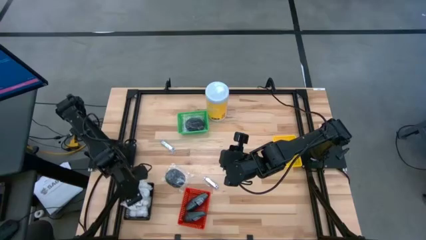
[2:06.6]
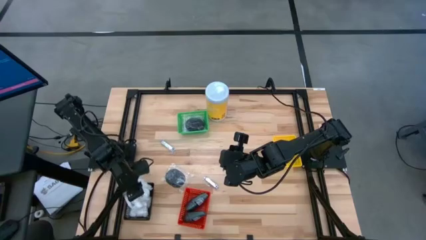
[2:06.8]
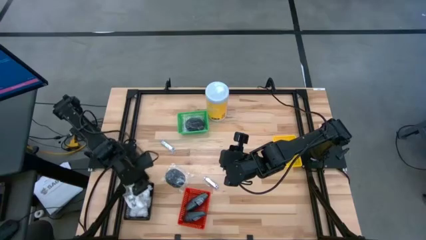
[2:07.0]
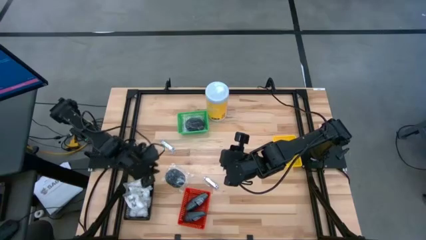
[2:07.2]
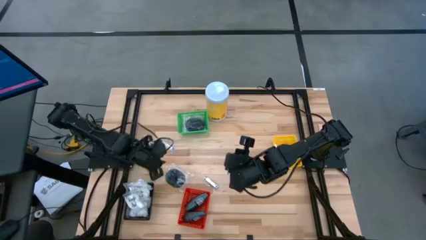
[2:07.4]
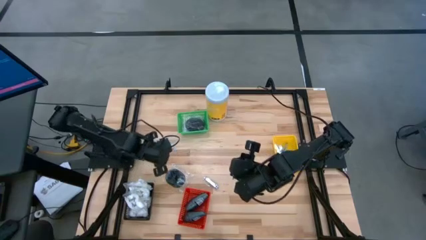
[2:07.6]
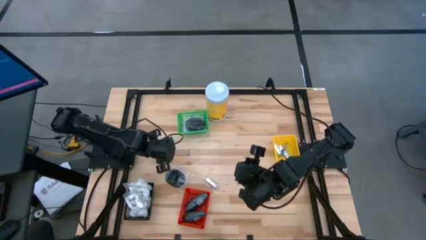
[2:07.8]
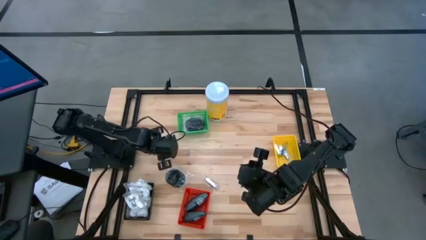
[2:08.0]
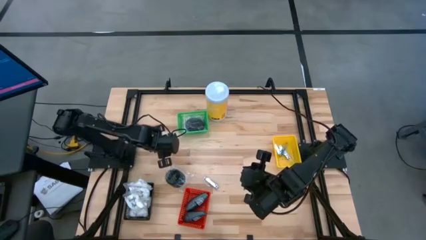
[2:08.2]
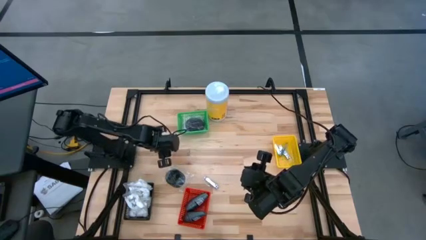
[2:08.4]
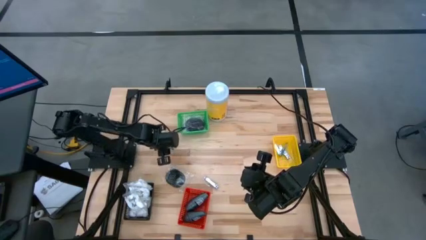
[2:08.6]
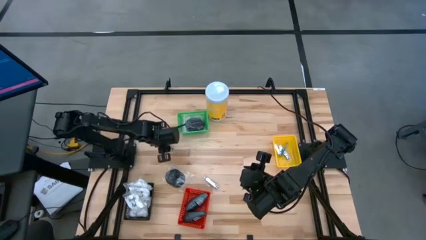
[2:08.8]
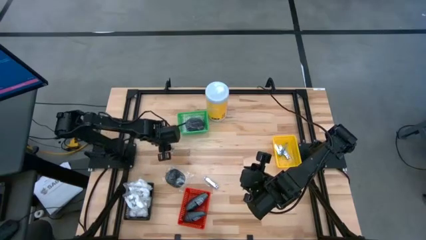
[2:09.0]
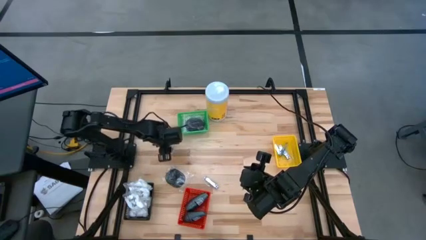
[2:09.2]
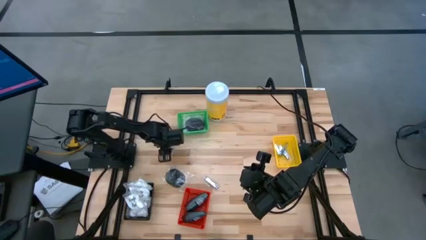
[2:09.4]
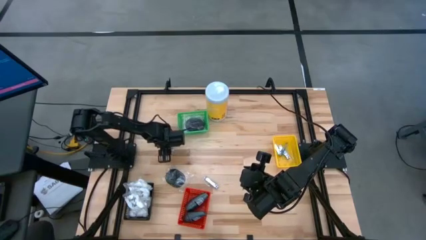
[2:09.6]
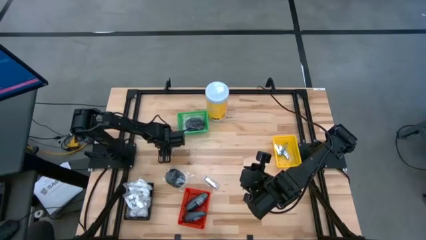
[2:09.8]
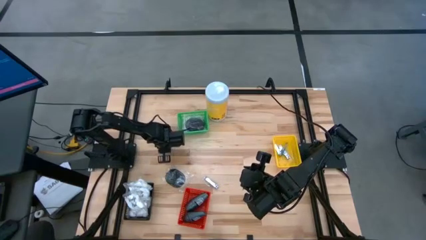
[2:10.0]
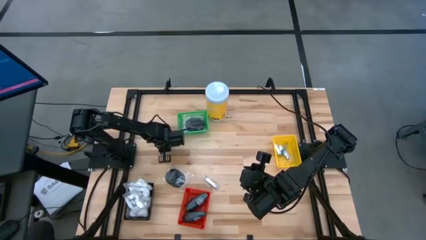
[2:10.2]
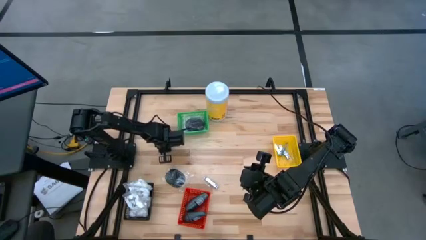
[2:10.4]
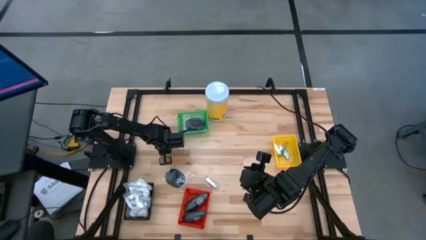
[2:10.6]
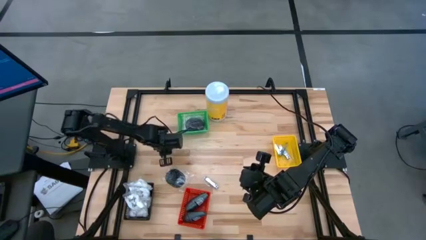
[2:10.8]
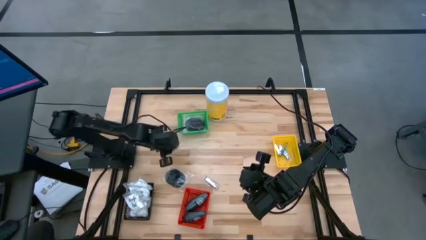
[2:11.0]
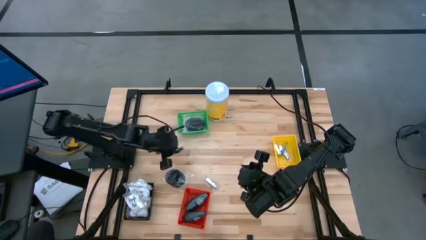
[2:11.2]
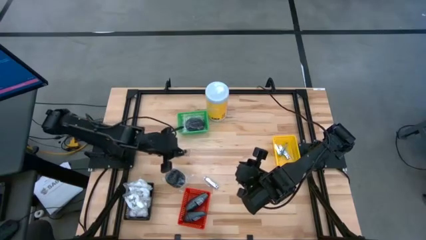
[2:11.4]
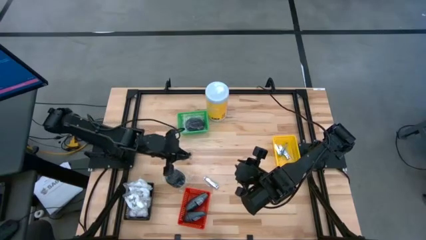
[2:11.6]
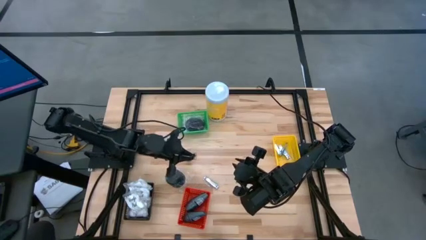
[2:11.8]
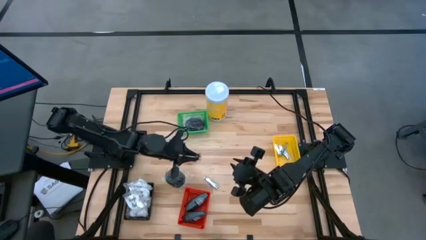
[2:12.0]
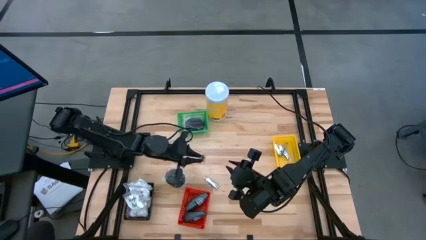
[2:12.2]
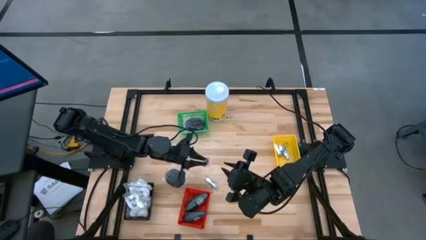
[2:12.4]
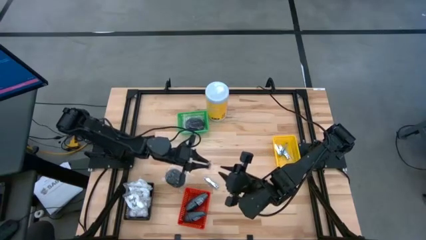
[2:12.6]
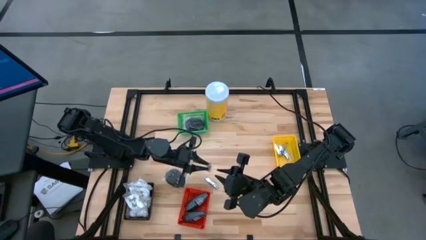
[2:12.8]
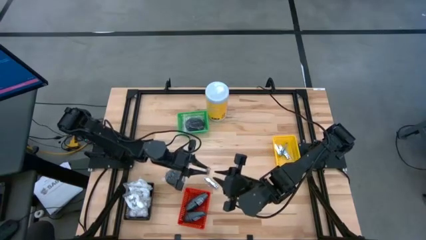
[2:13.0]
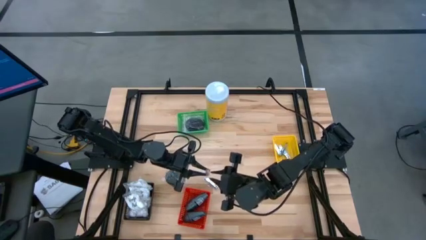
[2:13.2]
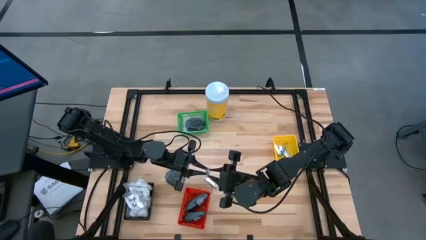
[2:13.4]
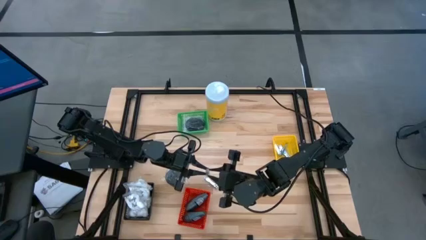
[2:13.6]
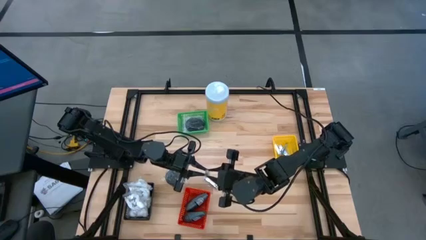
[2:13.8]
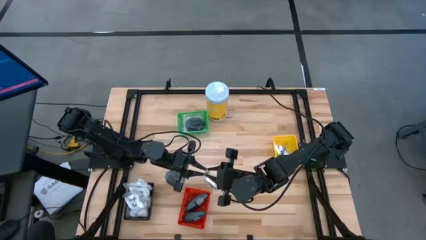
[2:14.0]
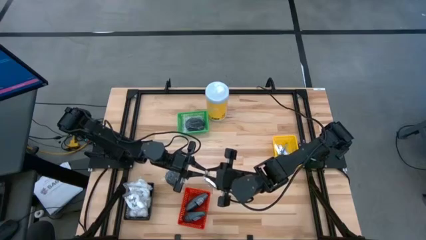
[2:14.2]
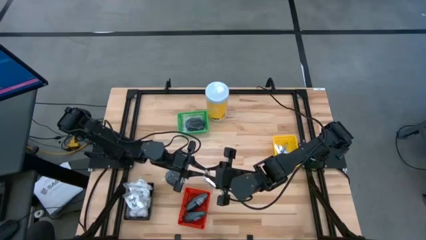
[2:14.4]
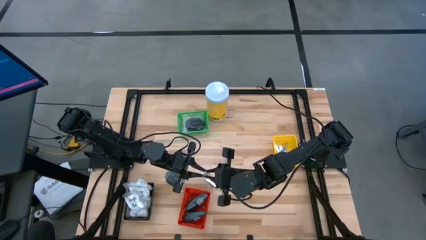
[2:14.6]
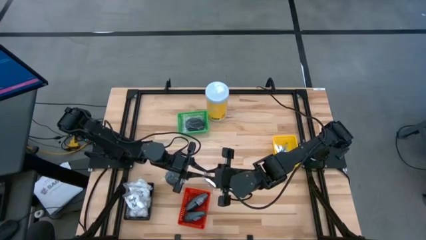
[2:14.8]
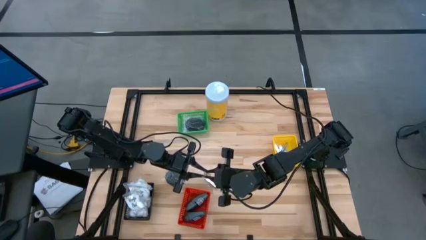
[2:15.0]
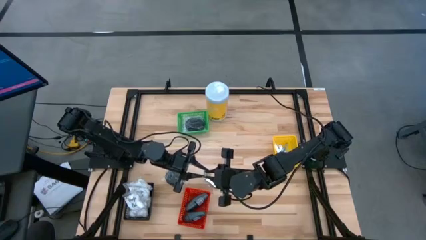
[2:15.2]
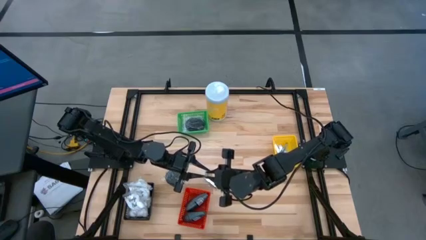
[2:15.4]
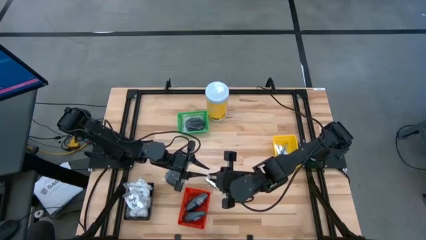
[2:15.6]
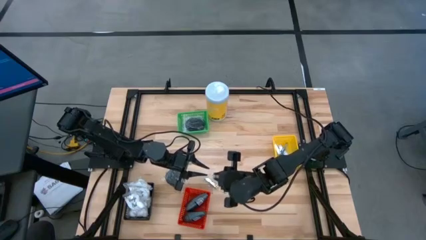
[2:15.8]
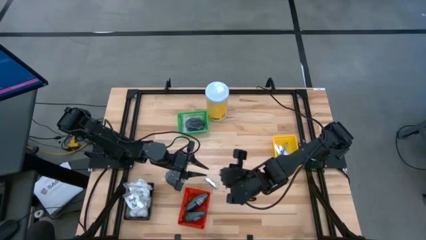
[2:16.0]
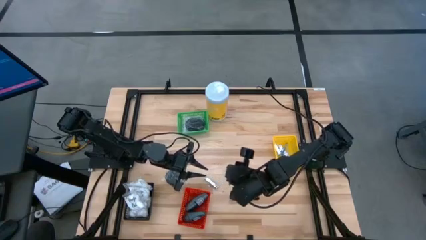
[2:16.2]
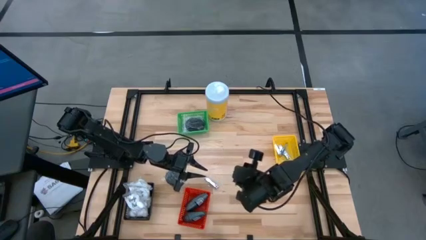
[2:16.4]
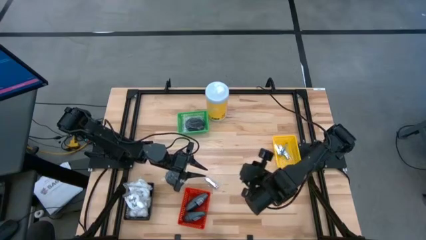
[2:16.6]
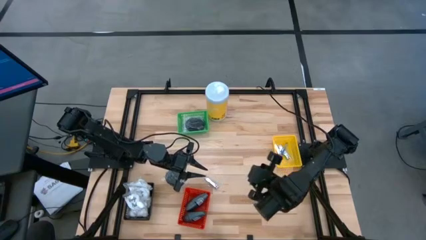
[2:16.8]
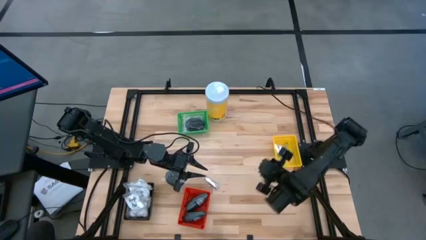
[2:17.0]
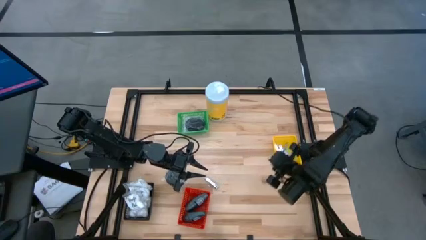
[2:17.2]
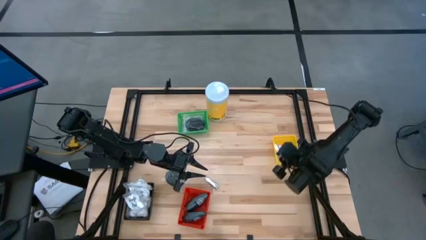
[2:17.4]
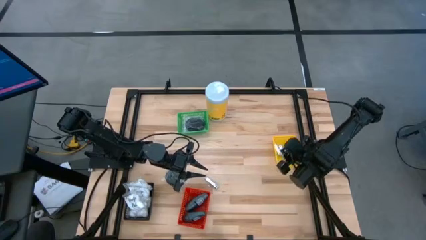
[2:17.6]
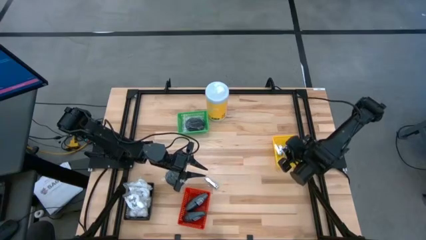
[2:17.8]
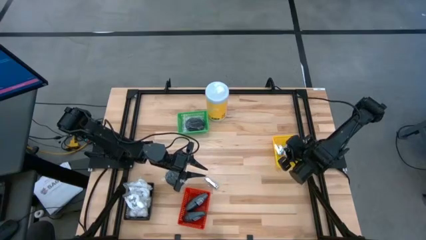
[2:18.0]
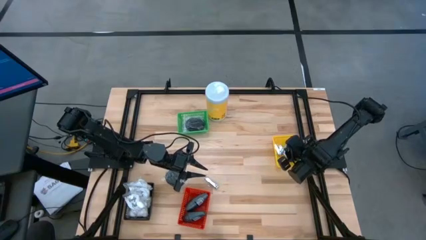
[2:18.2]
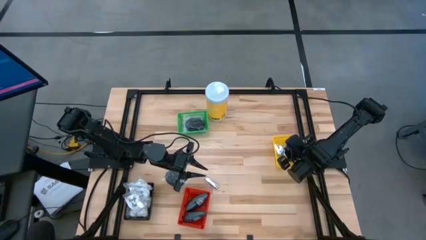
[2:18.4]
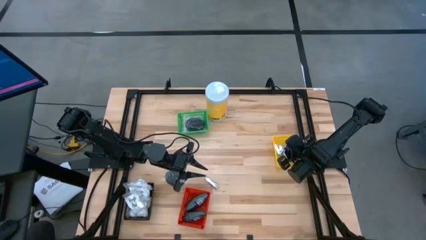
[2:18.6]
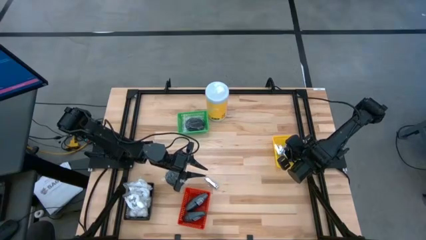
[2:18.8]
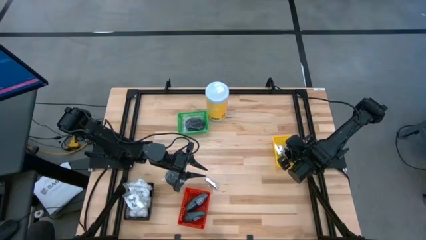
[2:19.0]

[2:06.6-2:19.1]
Task: Pick & Place Travel size toiletries
Put the silver nail cutter into the yellow bin

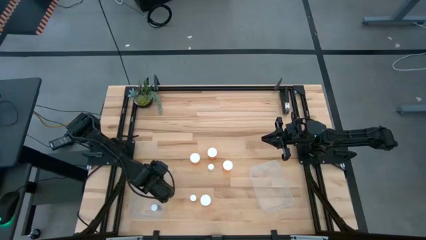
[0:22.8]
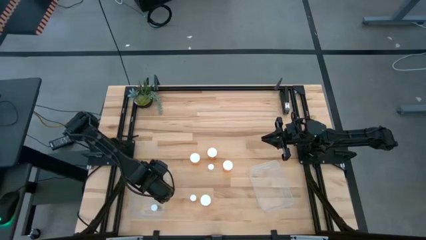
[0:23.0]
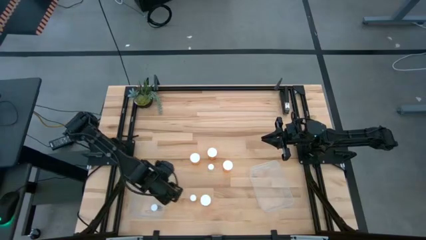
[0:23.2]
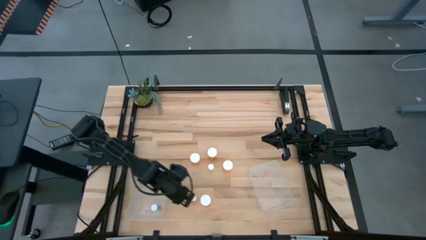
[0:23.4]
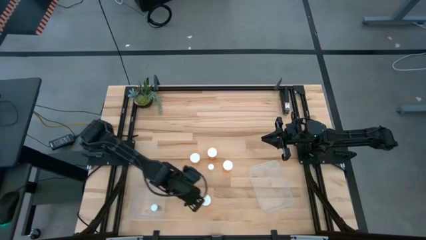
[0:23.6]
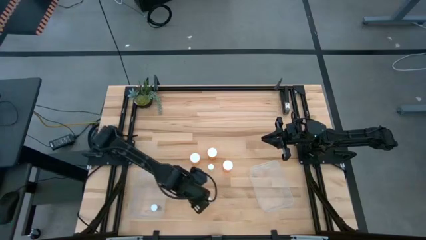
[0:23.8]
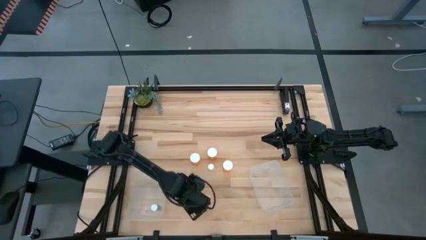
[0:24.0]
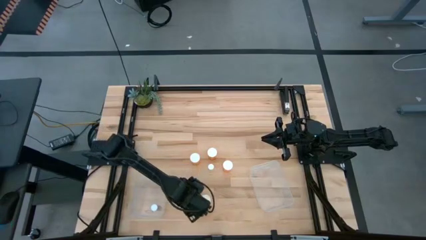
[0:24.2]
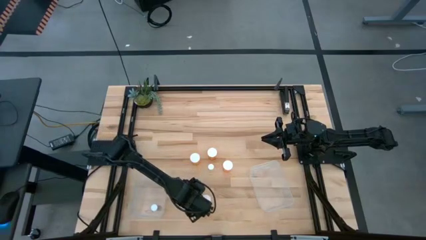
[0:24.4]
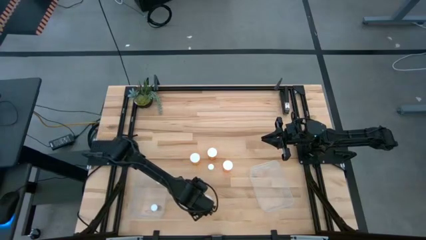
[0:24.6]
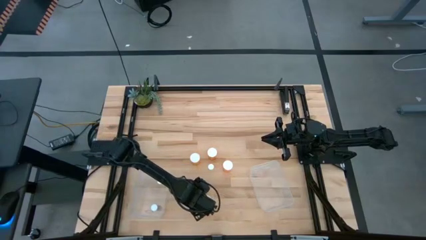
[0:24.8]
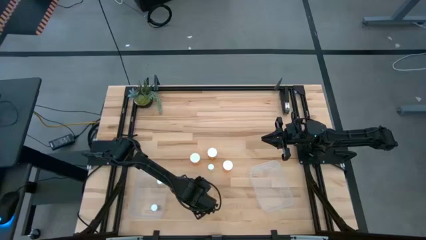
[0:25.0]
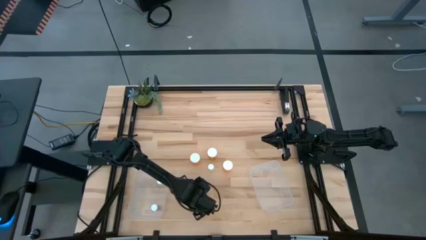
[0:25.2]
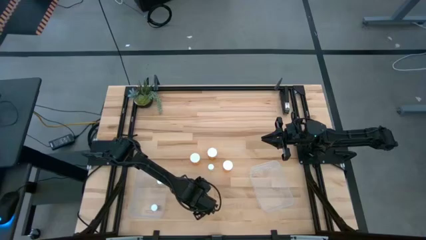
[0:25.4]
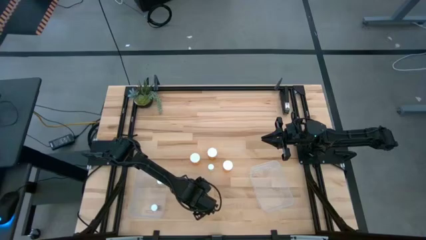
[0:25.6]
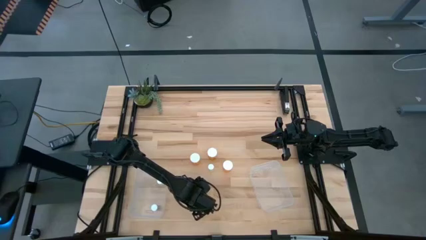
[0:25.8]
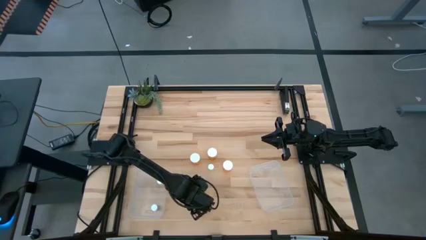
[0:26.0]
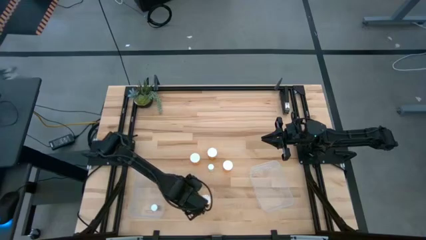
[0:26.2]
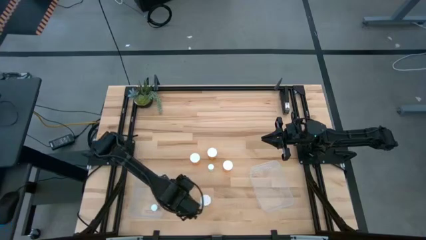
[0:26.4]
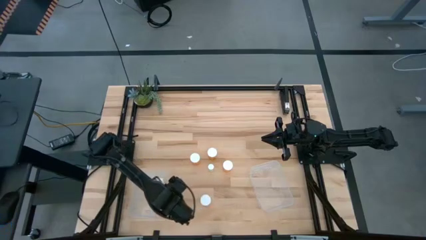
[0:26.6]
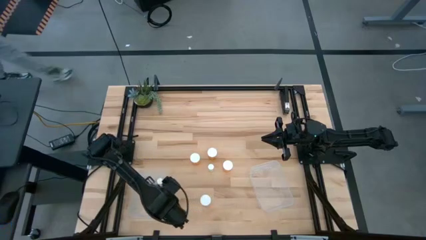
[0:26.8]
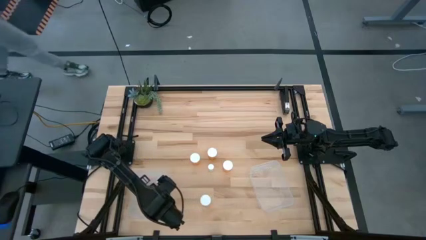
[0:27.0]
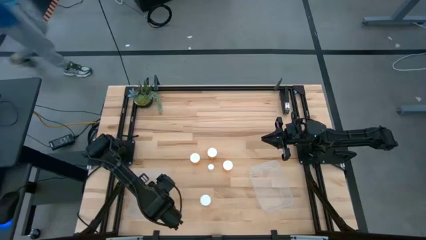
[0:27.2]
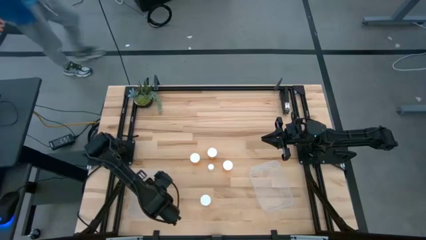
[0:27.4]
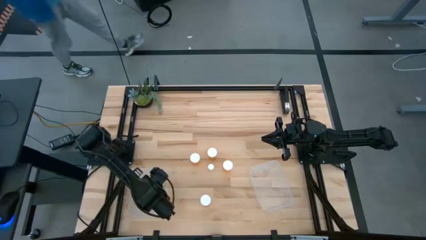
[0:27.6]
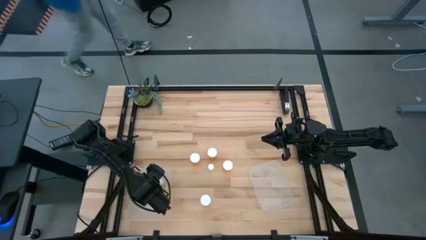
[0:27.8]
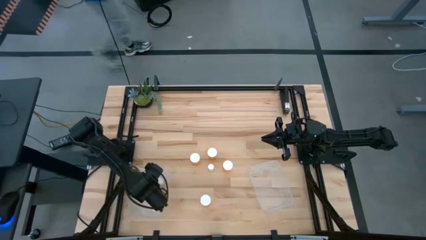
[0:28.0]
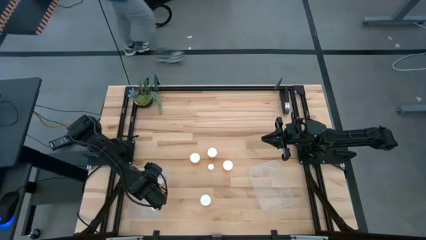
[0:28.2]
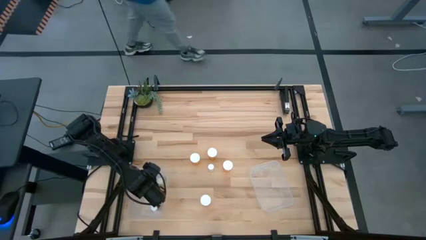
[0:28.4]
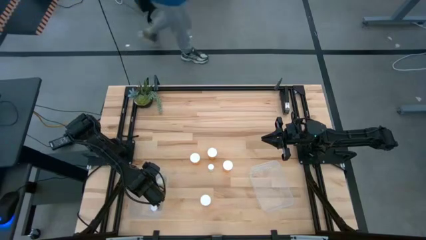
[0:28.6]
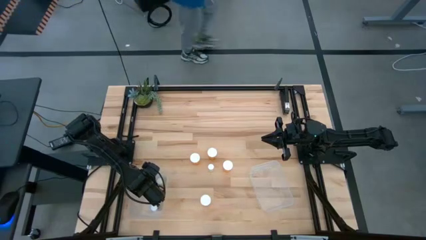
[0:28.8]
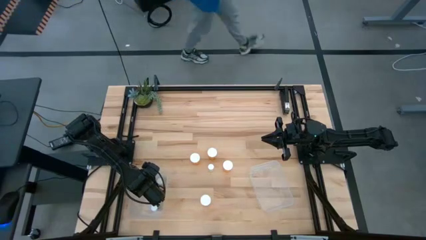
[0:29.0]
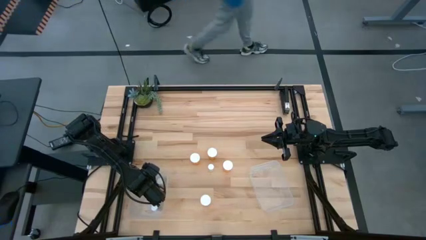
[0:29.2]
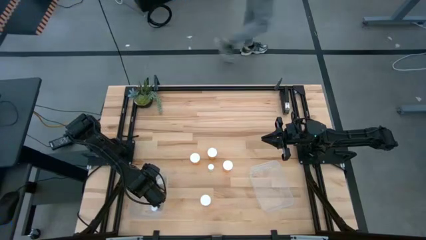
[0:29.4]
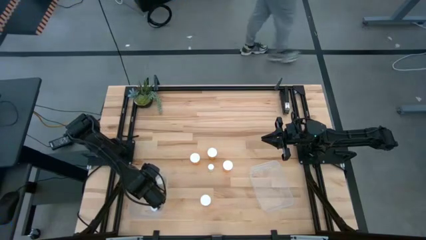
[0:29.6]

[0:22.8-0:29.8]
Task: Pick and place medicine bottles into bin by pill shape (circle, oval)
Put the small orange pill bottle into the left transparent bin
